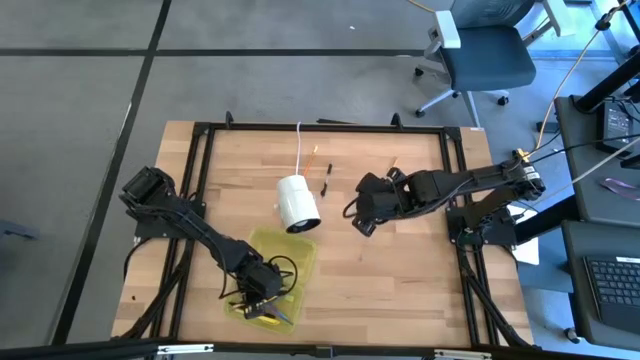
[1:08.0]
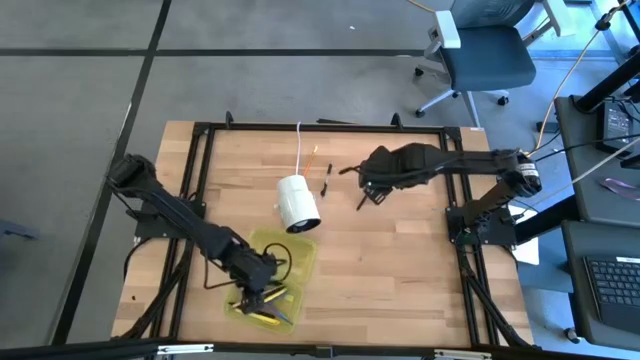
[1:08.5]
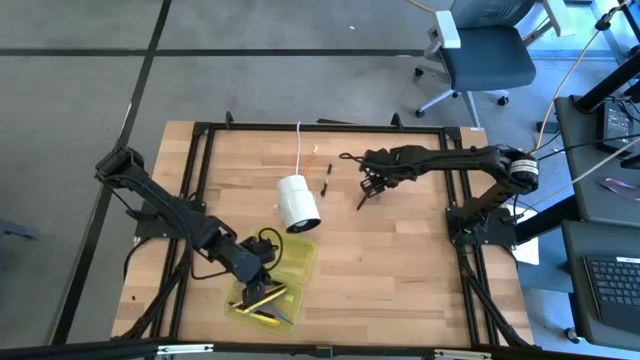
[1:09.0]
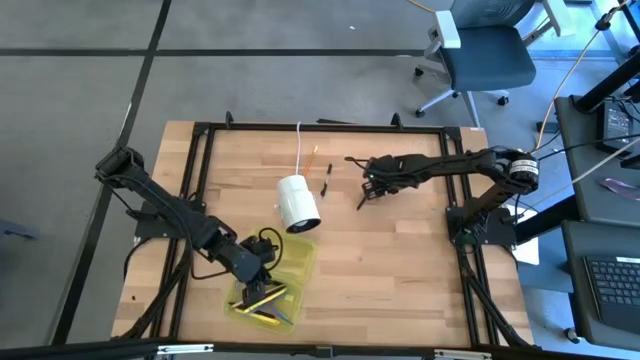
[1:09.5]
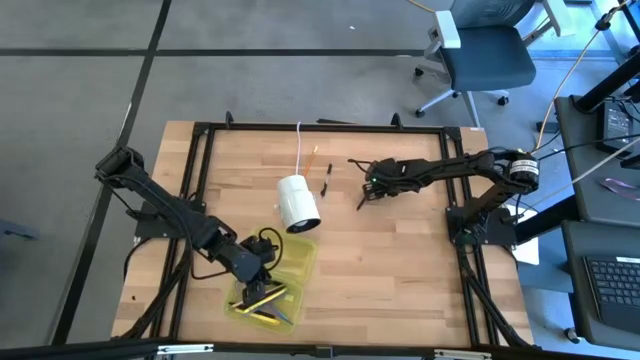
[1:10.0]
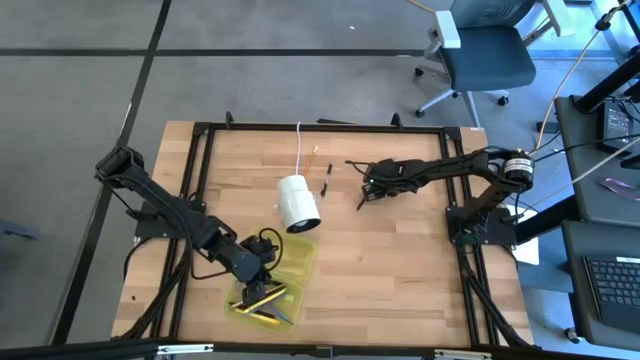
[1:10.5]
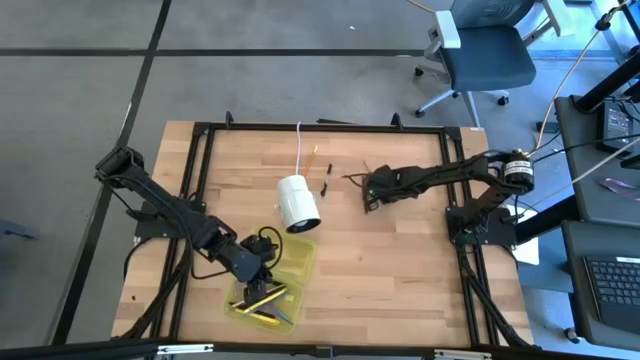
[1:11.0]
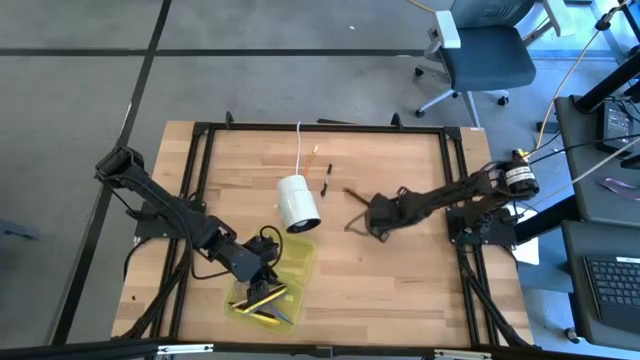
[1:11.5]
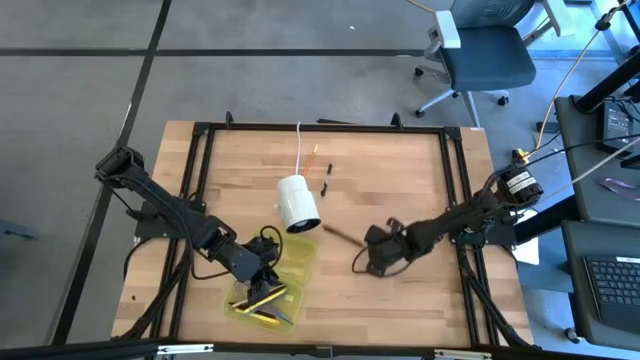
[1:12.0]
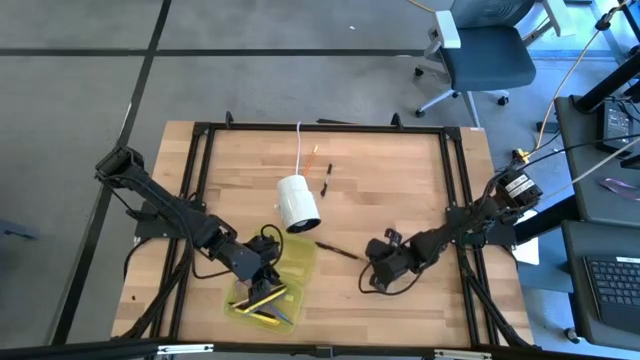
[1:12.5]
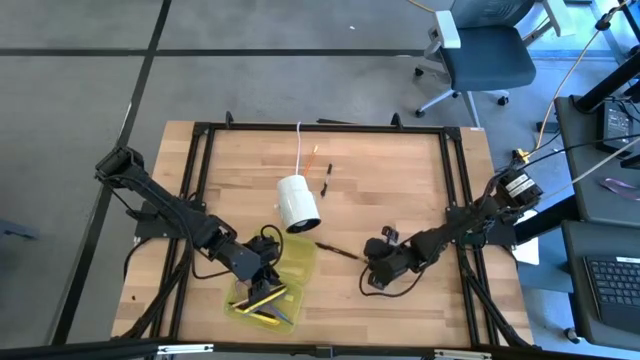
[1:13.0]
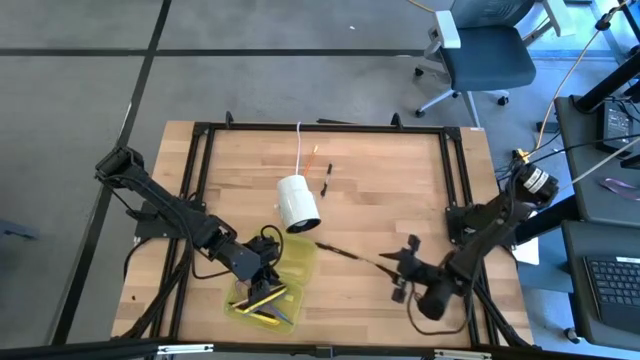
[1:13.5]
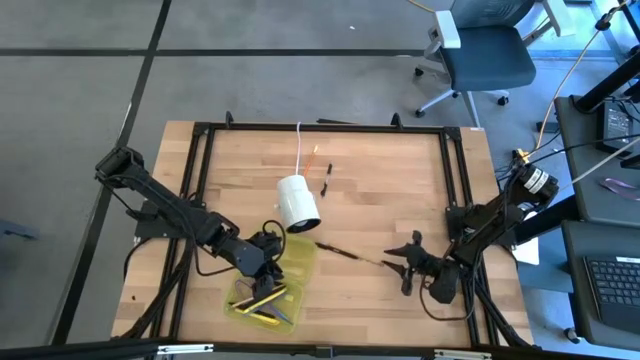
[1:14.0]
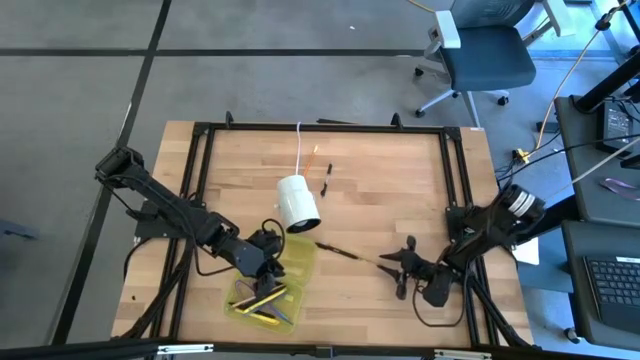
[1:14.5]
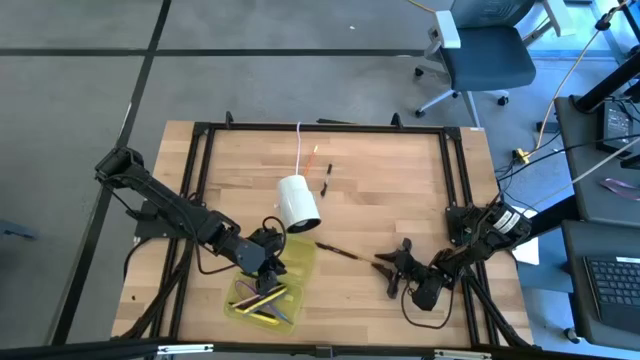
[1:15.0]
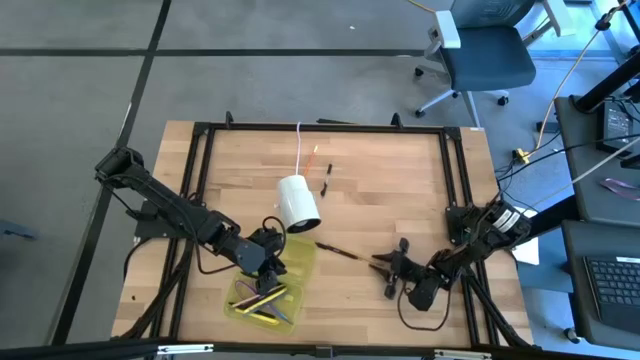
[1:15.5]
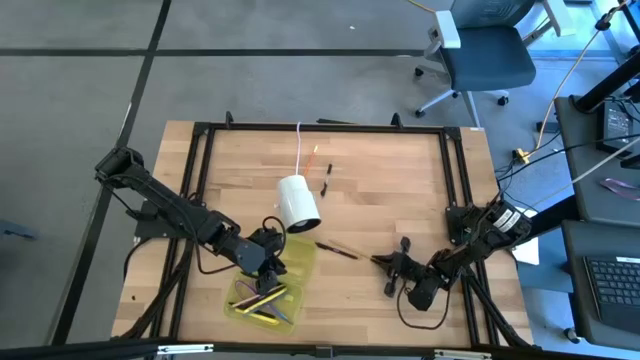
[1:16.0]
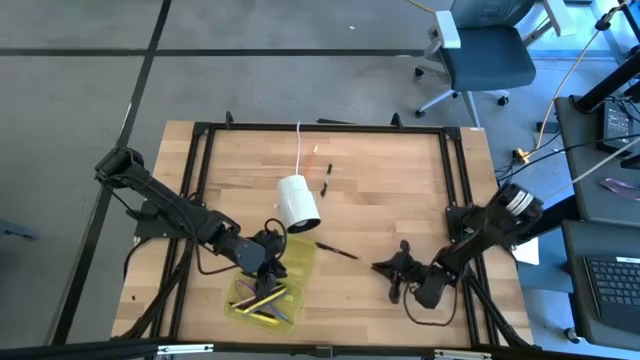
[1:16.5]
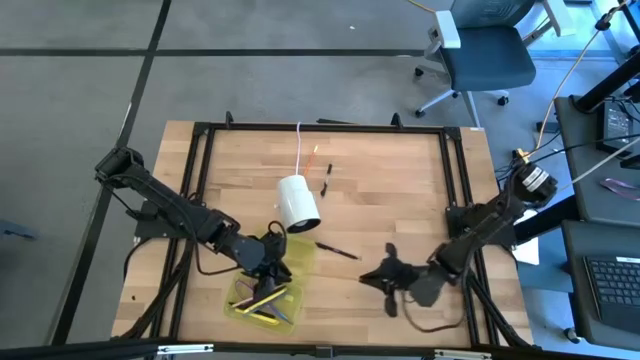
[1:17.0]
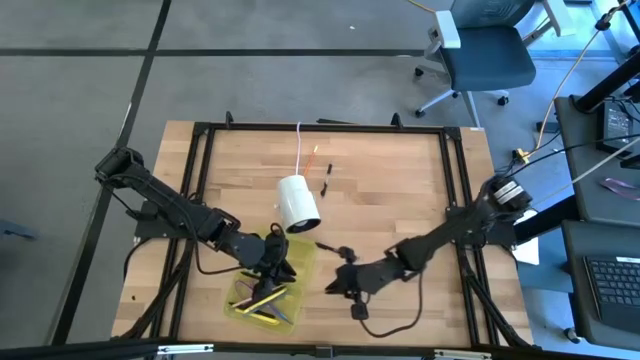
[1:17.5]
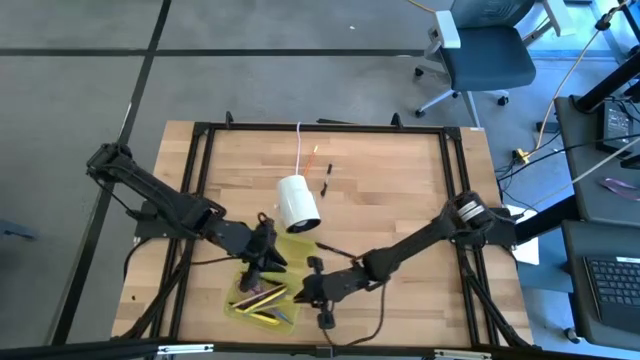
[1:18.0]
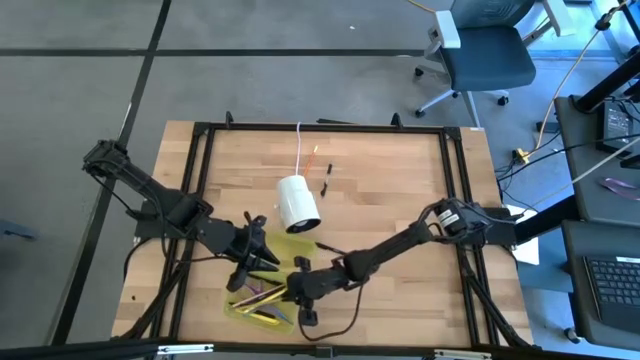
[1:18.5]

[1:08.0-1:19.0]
Task: Pick & place school supplies into a supply box
Put the yellow pencil into the supply box

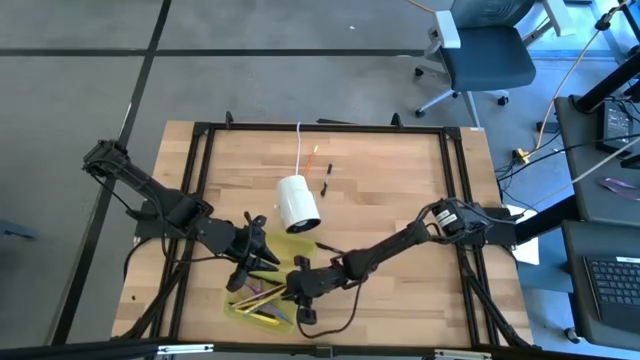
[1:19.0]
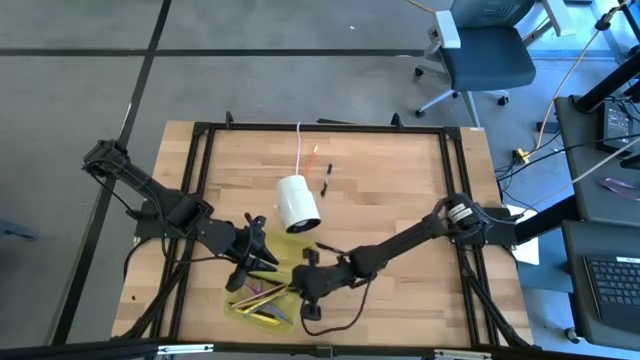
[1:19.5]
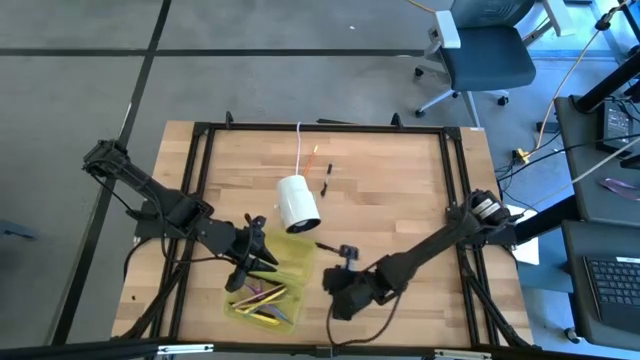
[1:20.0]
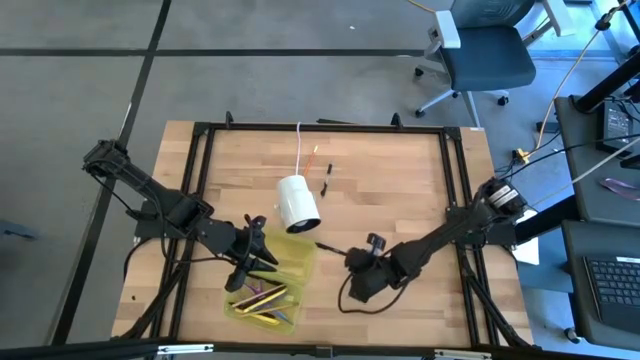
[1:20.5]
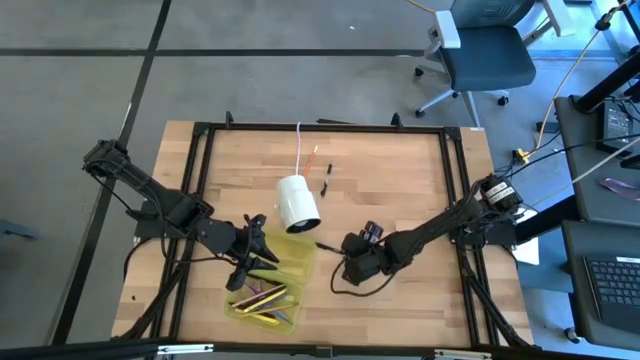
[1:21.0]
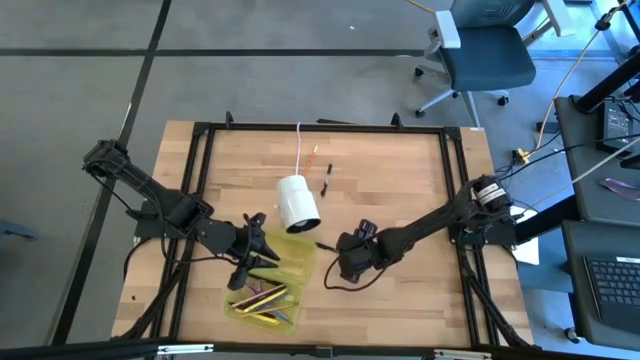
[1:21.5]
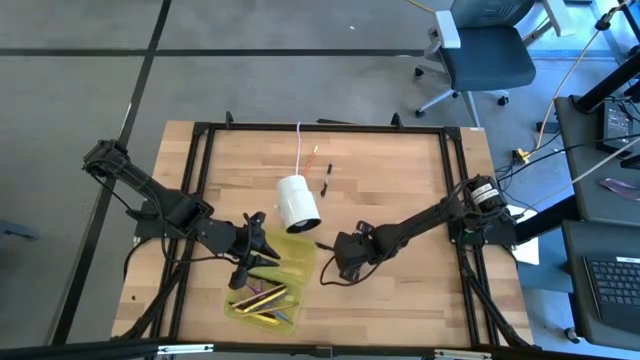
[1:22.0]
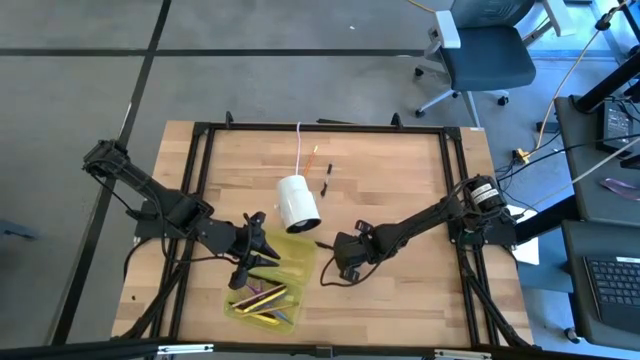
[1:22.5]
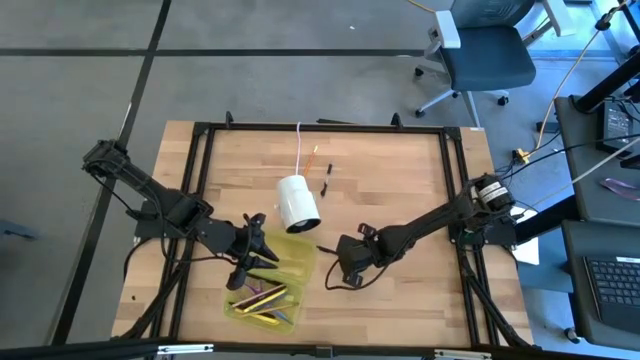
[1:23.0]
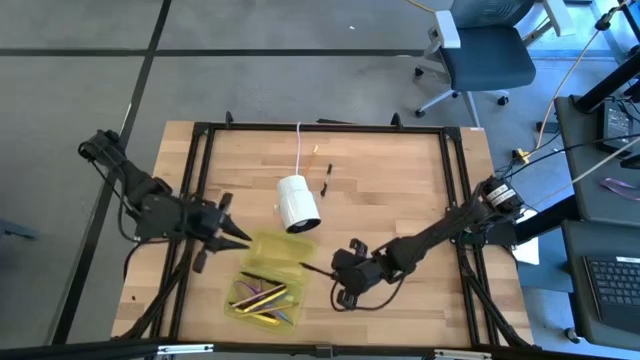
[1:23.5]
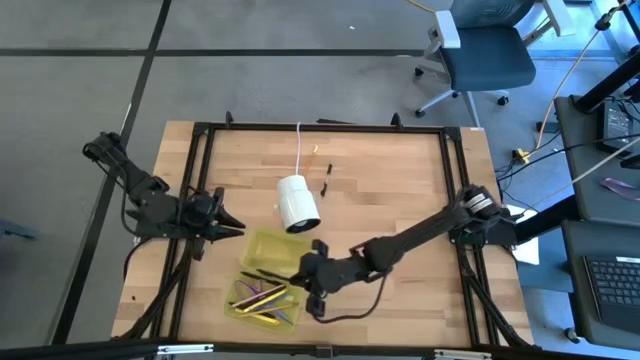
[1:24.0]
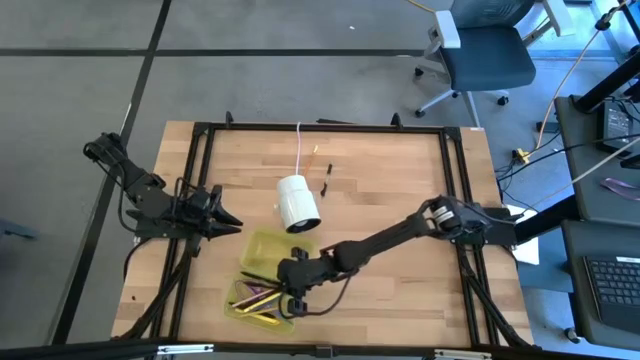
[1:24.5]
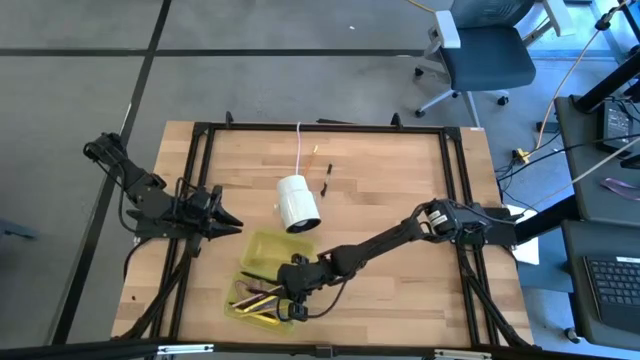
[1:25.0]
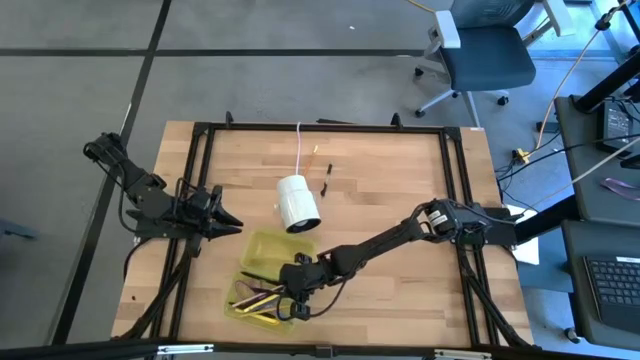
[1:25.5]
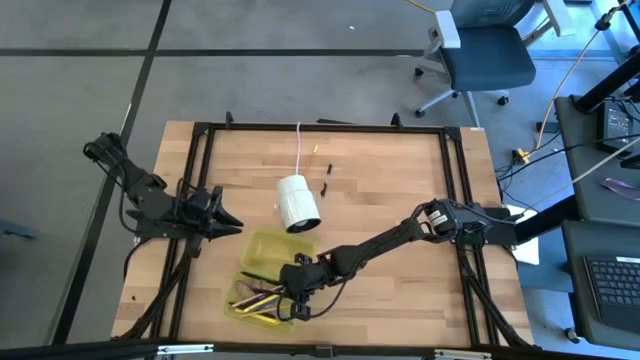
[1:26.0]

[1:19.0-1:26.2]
Put the black pen into the supply box

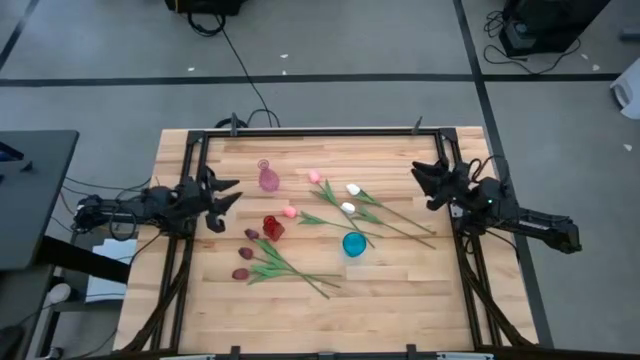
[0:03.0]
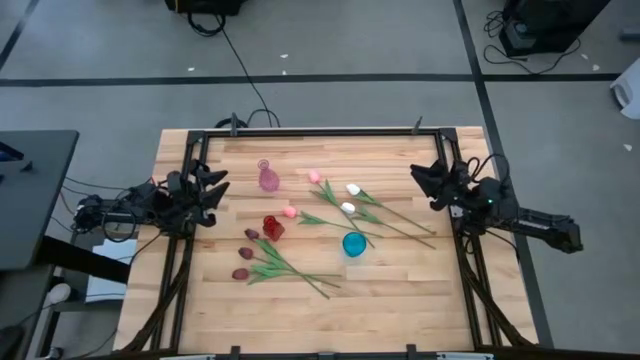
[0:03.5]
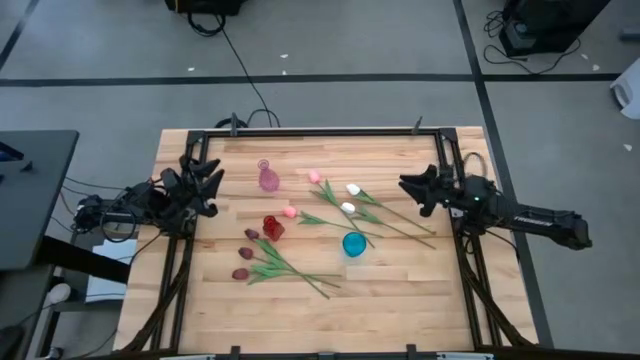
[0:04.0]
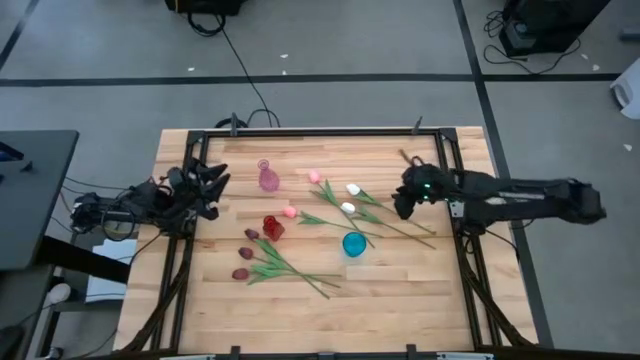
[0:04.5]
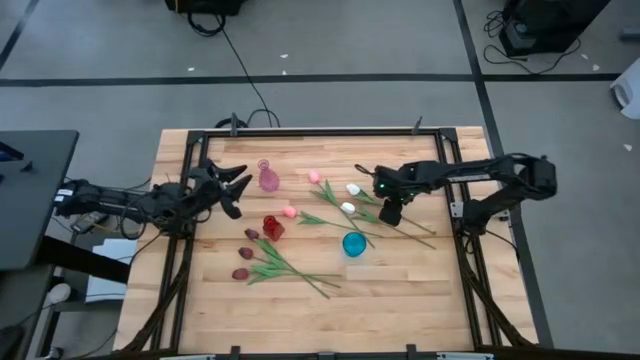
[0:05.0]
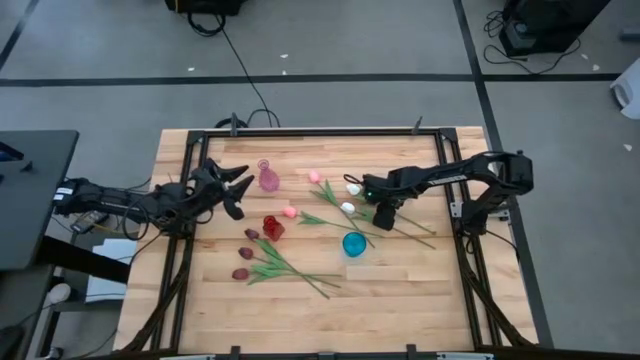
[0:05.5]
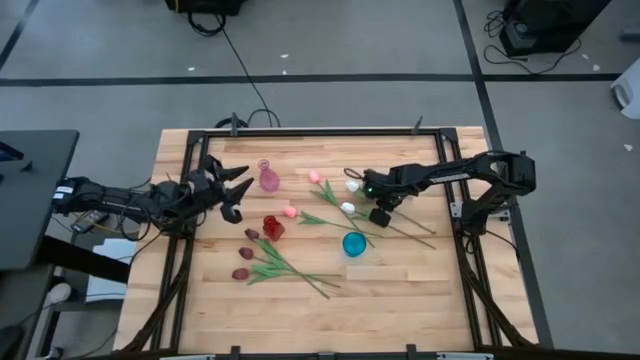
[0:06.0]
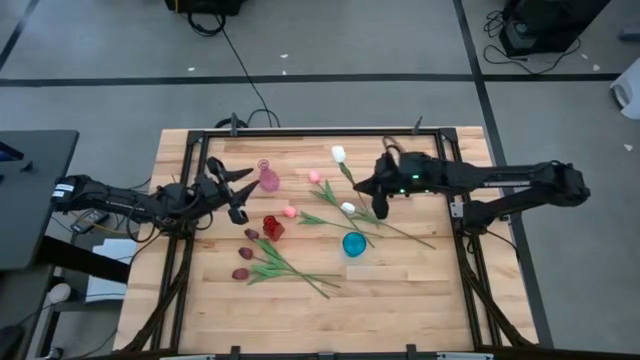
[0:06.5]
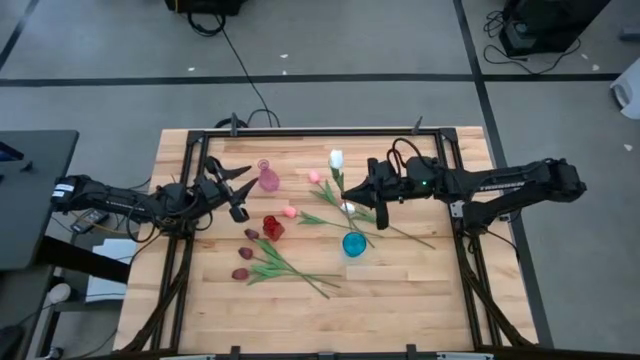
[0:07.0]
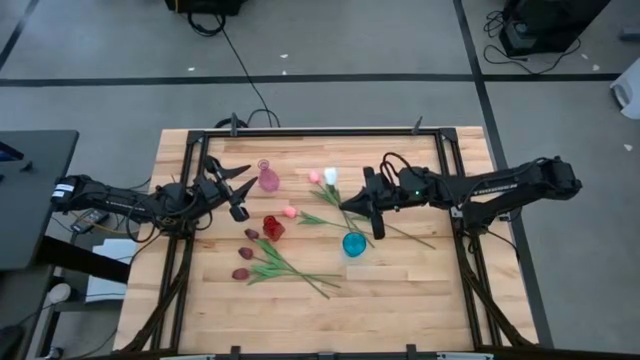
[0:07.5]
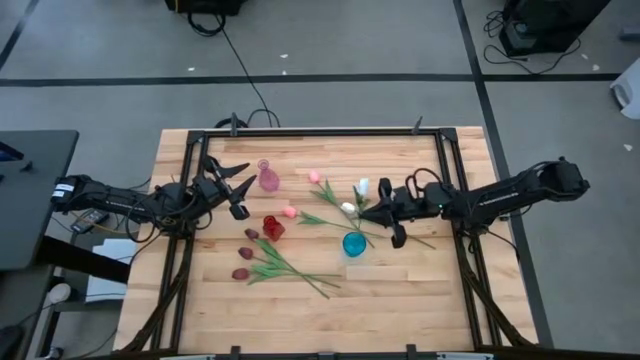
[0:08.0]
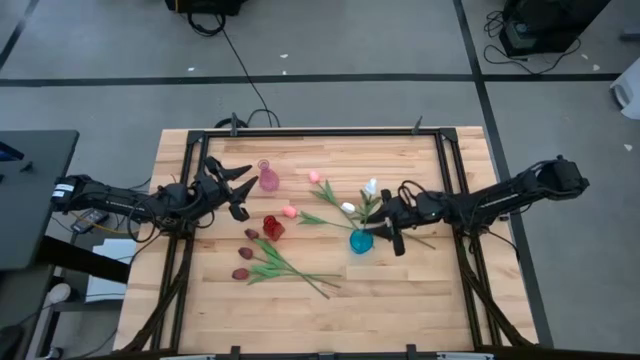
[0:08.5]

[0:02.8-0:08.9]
Task: Sort flowers into vase by color
Put the top white tulip into the blue vase
